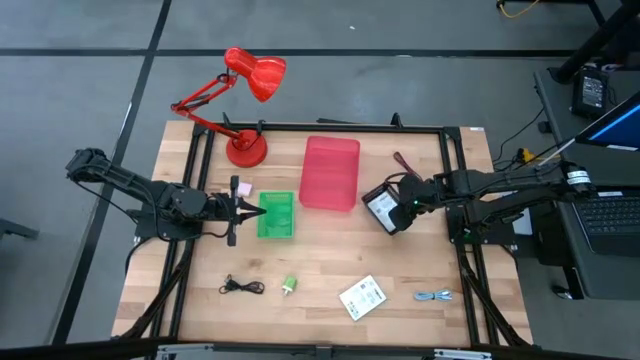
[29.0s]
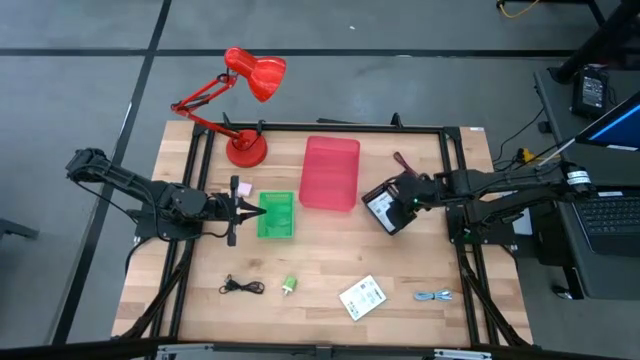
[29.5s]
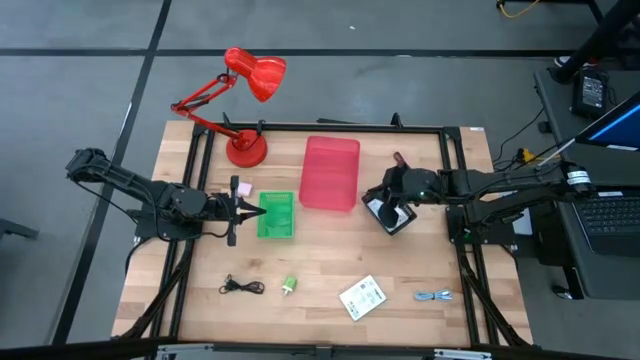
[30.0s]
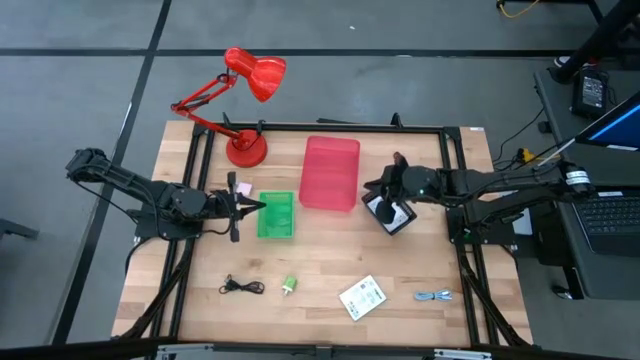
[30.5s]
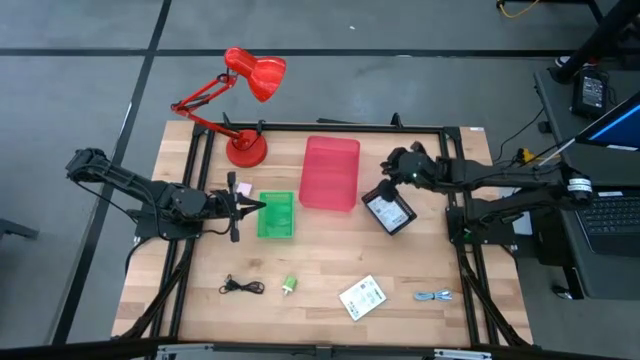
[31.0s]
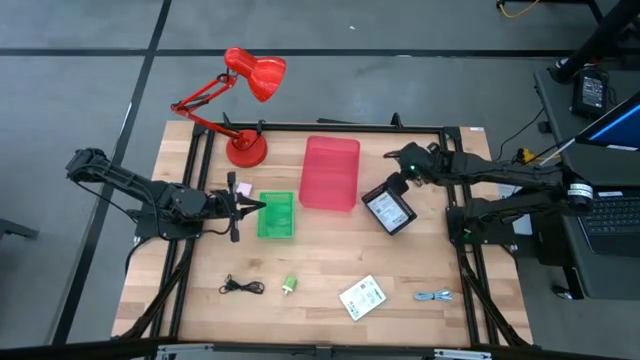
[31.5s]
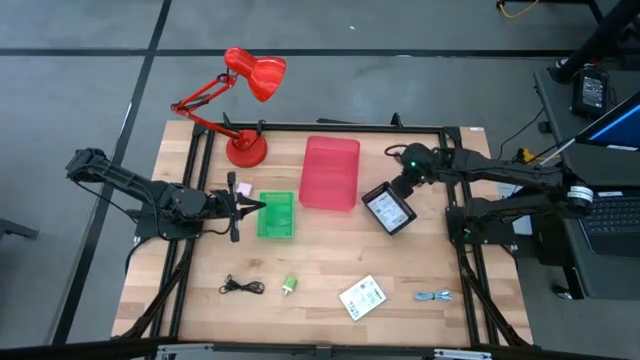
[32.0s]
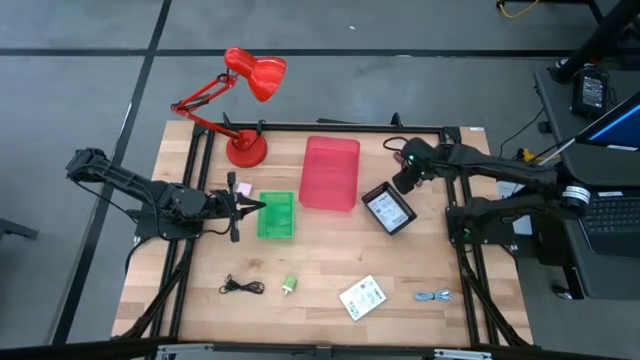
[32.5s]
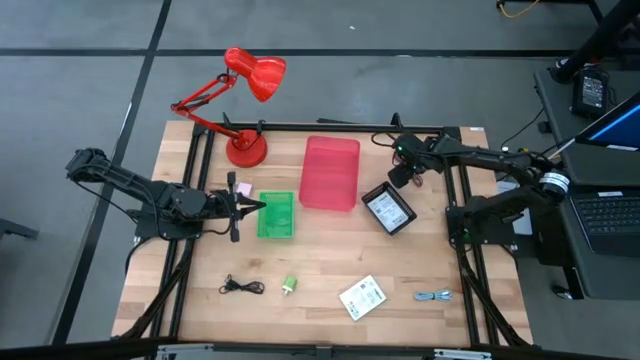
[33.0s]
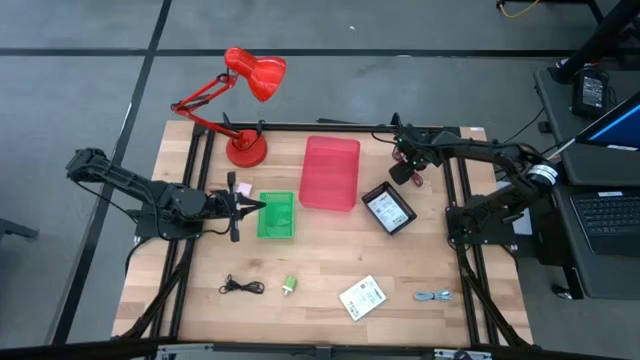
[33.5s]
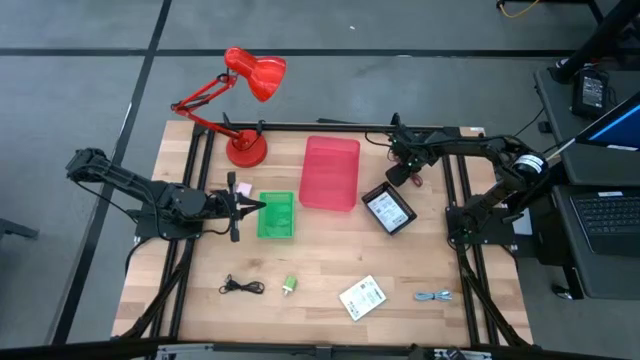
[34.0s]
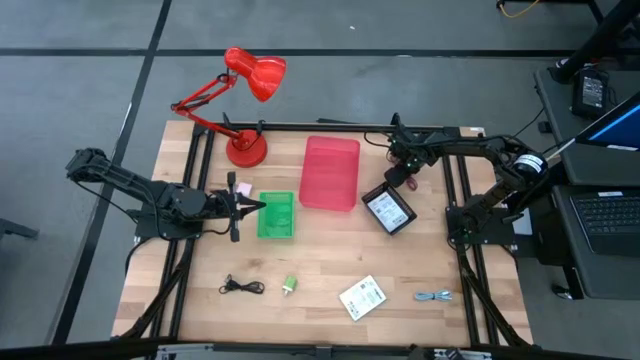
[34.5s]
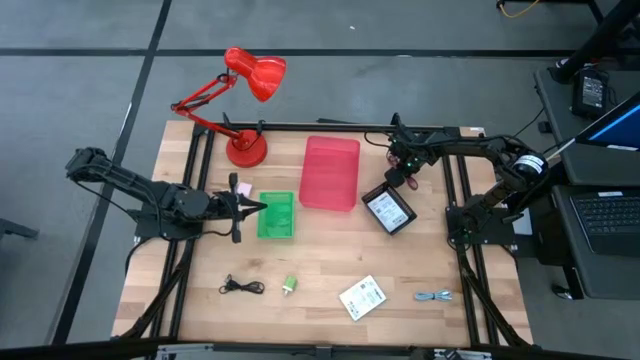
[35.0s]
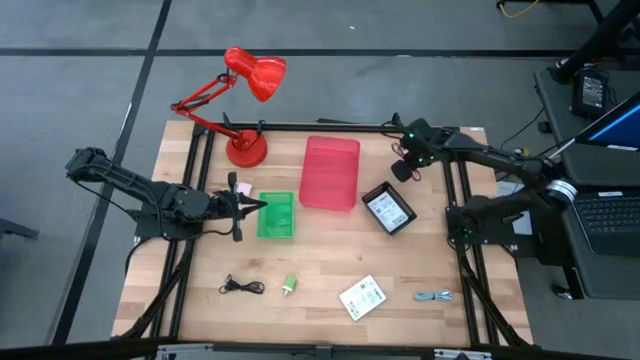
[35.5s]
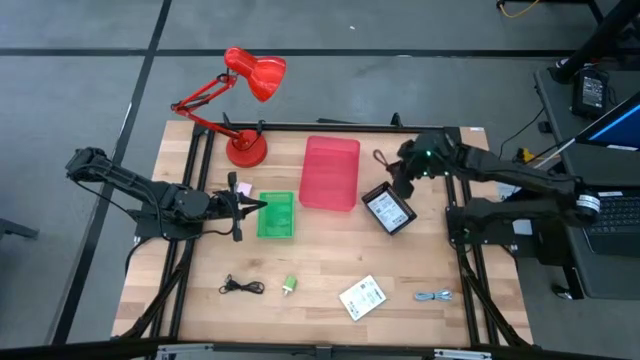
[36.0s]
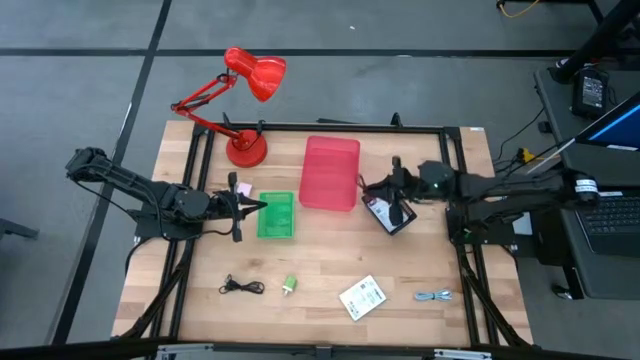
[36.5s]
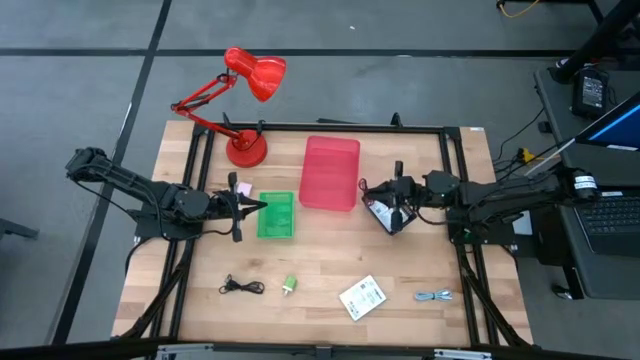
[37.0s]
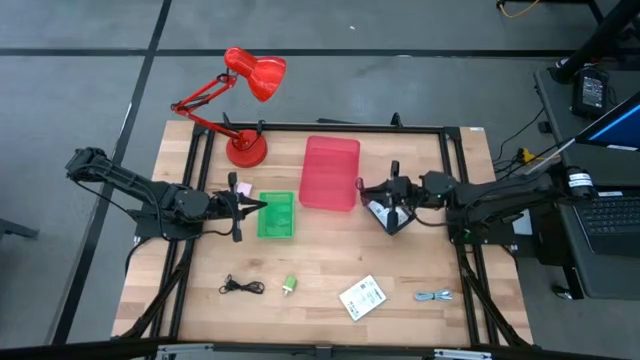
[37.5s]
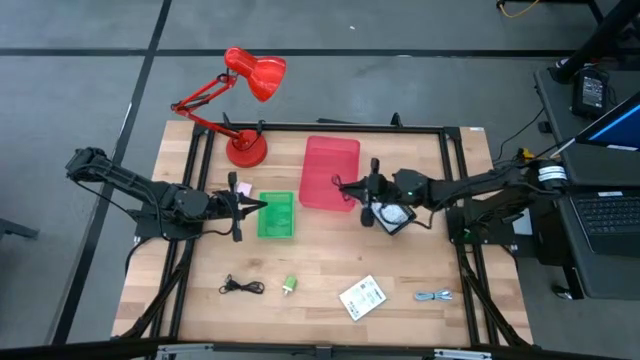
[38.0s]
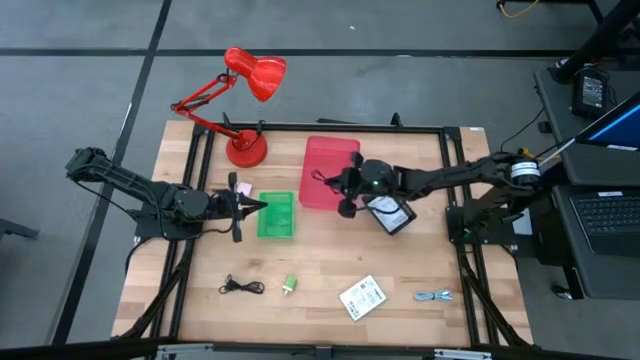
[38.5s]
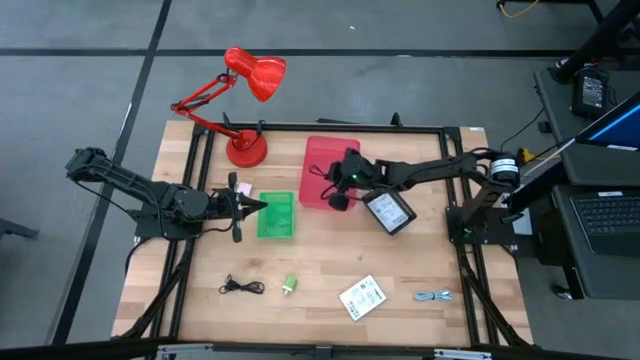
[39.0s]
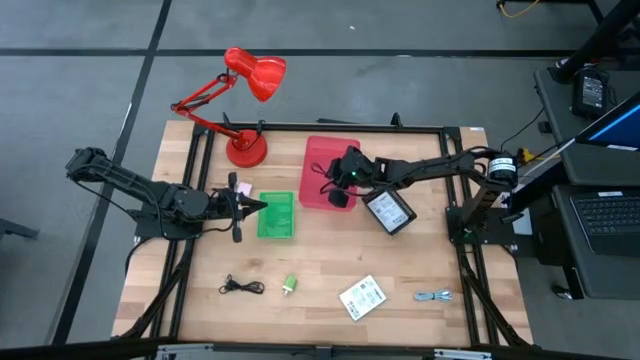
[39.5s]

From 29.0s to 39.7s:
Task: Pick and place items into bin
Put the pink charger cable into the pink bin

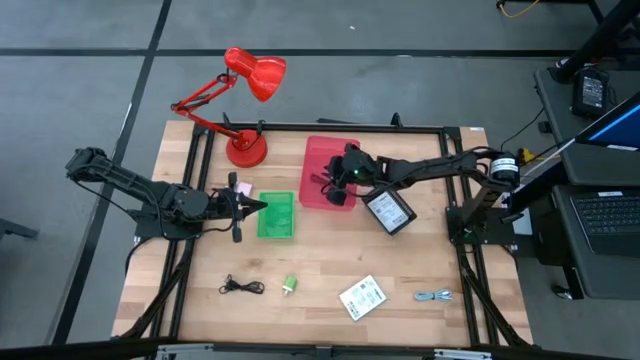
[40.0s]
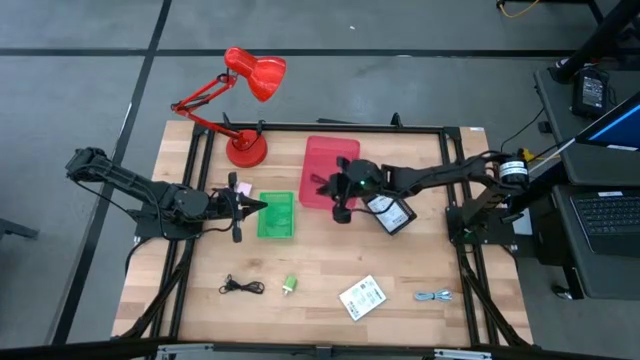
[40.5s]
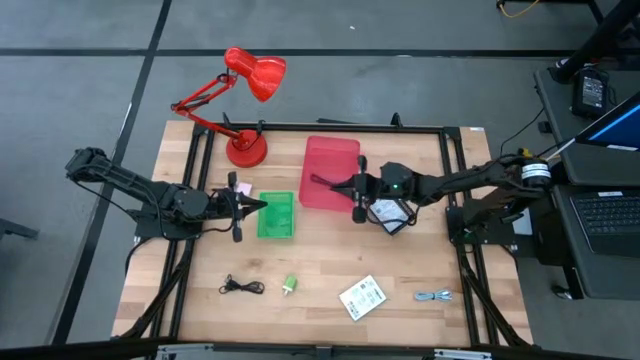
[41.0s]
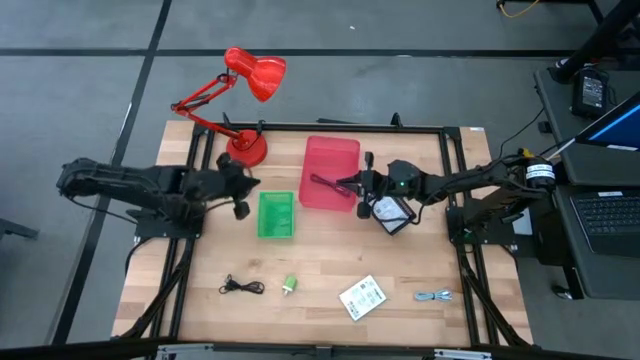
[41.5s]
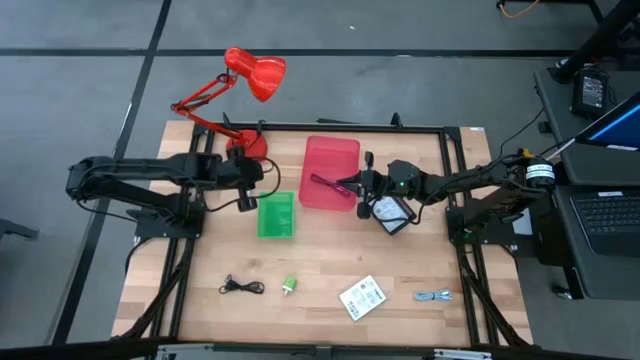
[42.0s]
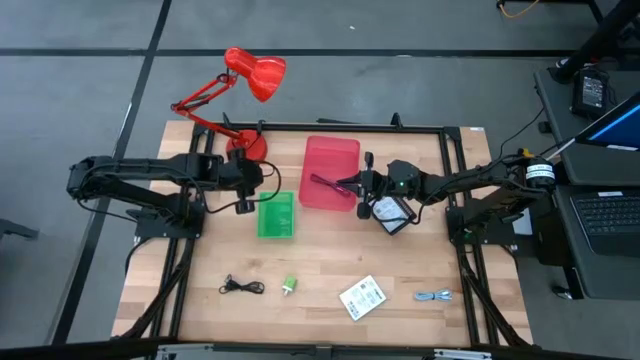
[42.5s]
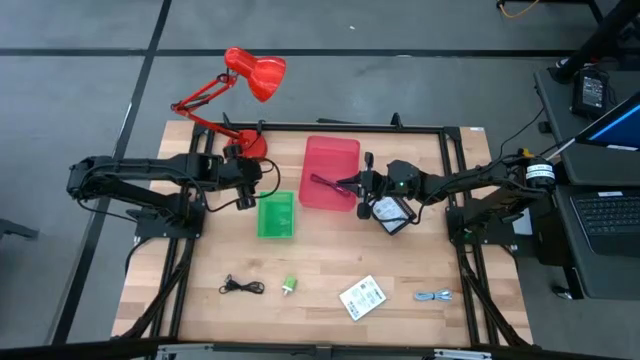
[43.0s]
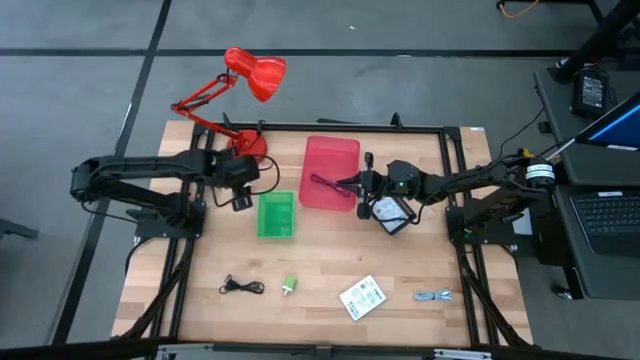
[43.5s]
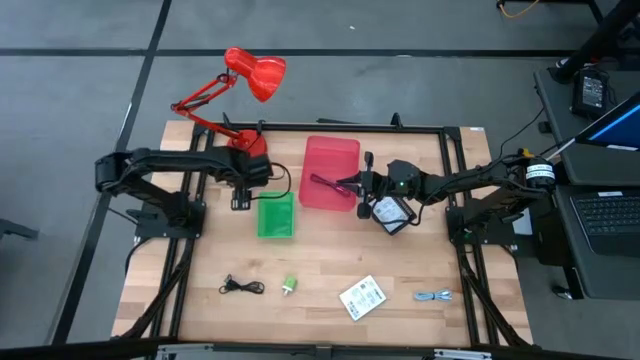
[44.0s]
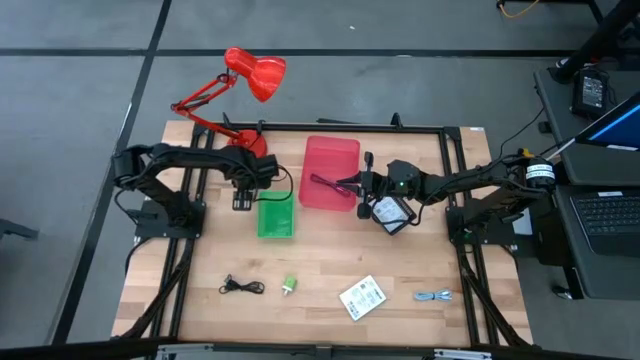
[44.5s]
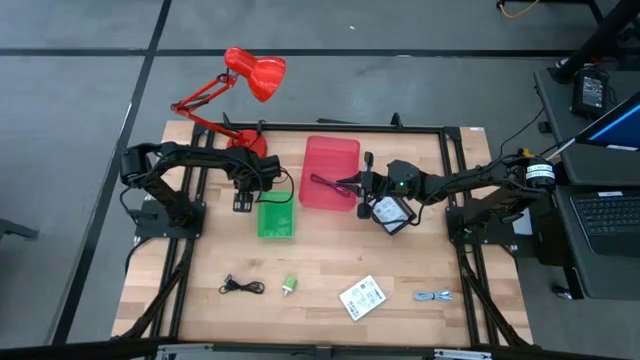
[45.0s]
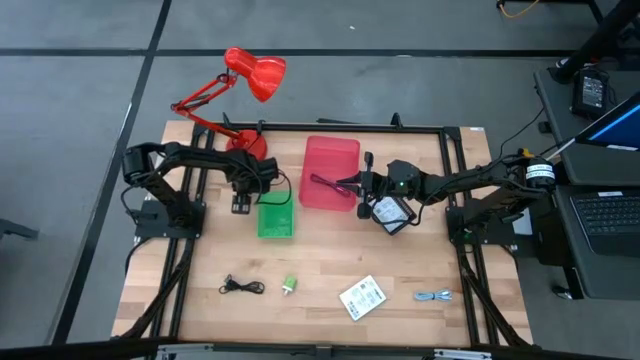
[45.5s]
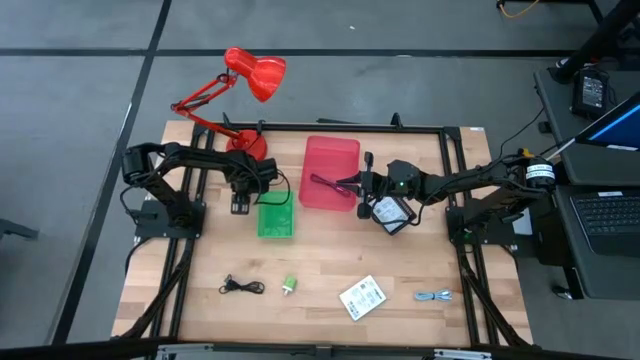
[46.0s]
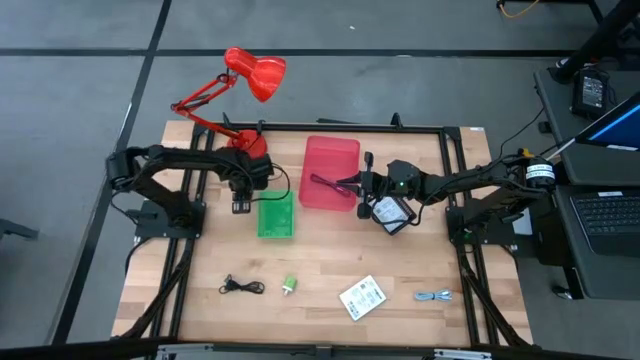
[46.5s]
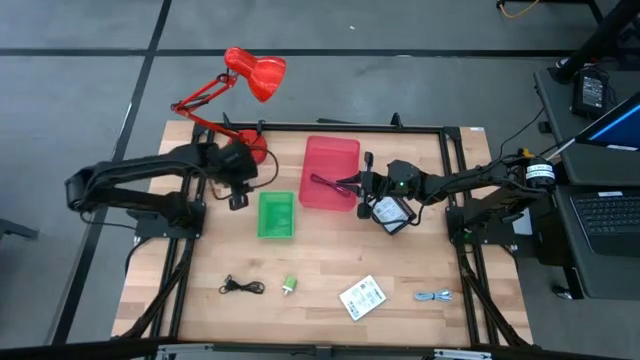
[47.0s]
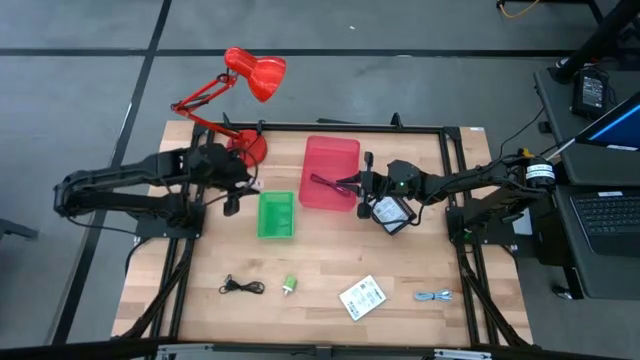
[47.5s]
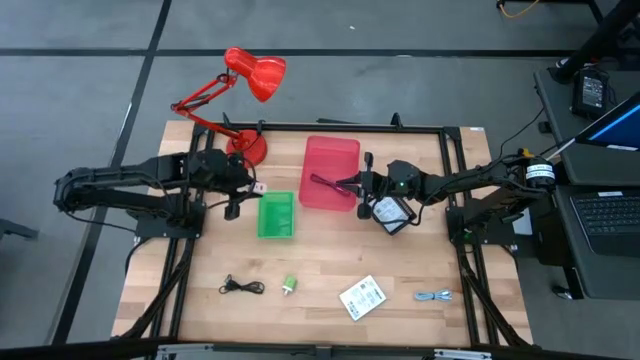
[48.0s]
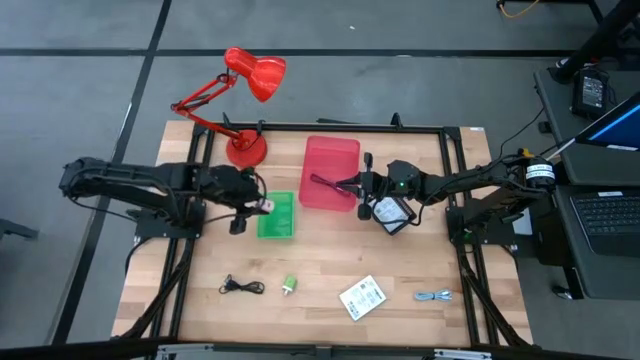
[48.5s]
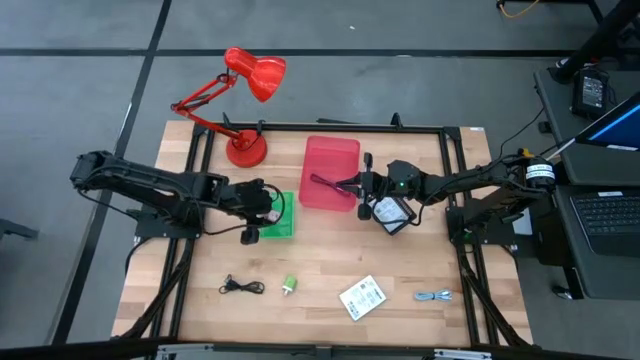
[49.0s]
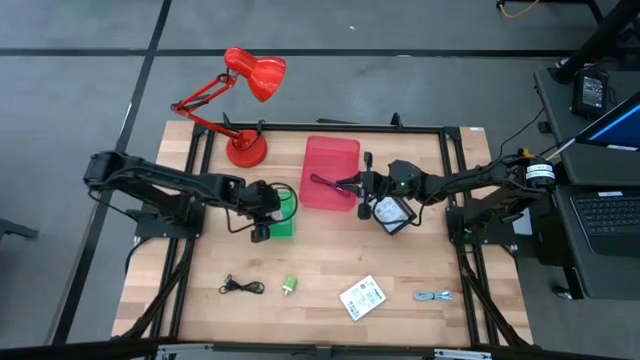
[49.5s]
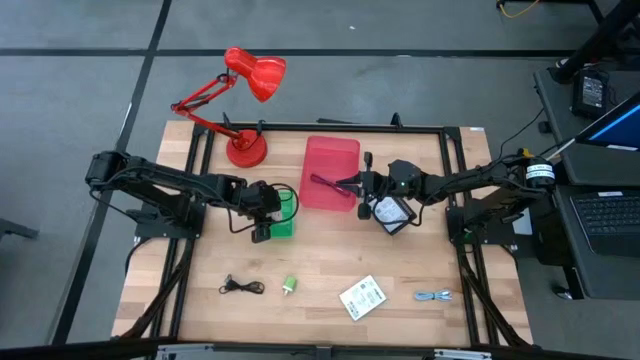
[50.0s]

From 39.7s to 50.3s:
Put the white charger adapter into the green bin
